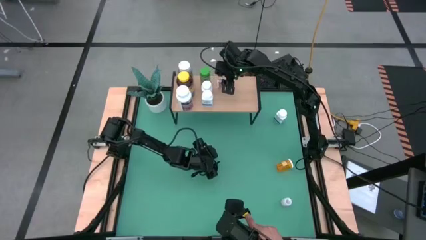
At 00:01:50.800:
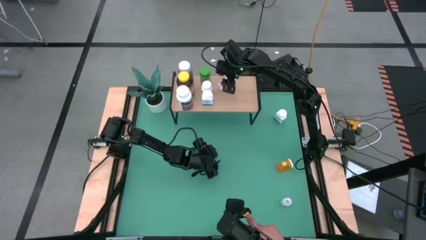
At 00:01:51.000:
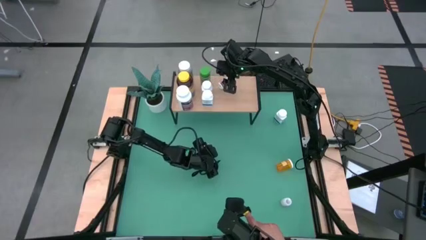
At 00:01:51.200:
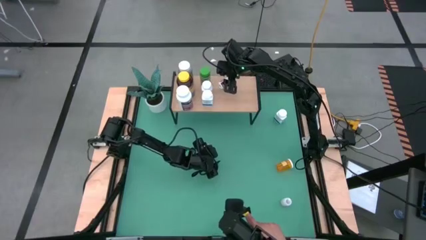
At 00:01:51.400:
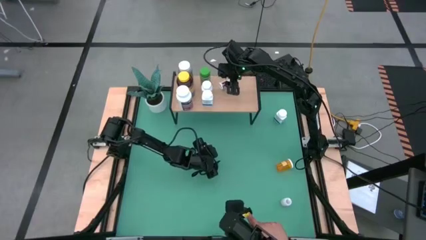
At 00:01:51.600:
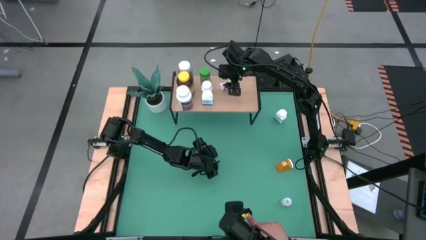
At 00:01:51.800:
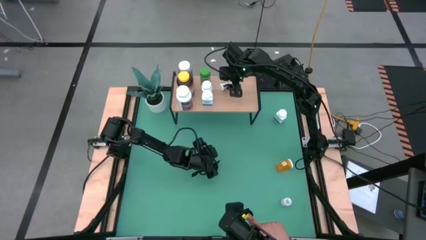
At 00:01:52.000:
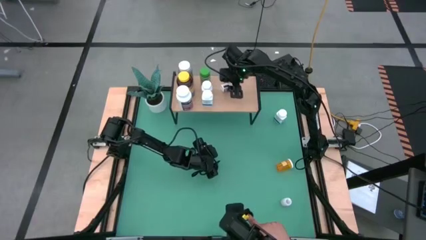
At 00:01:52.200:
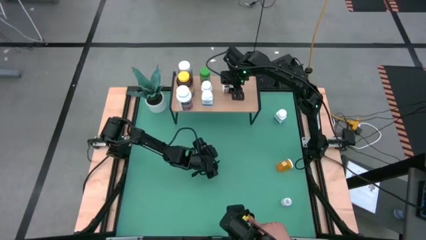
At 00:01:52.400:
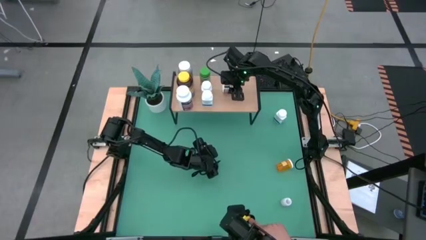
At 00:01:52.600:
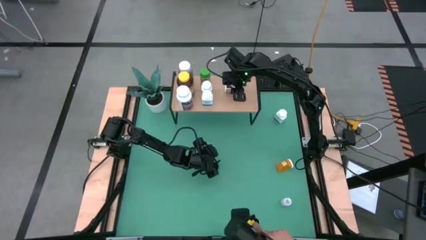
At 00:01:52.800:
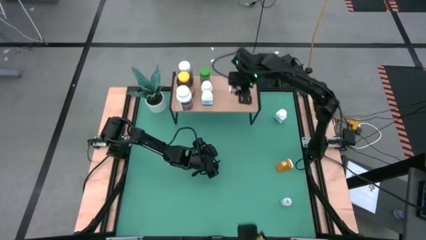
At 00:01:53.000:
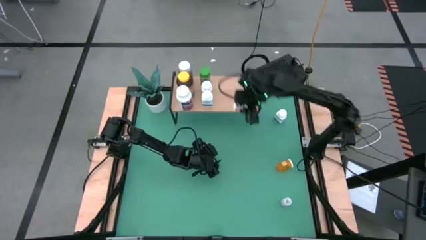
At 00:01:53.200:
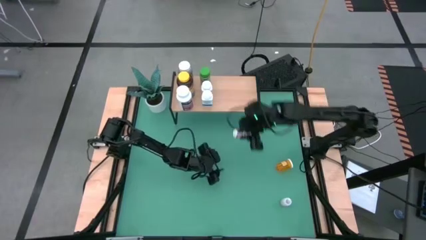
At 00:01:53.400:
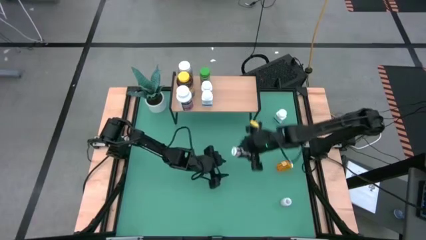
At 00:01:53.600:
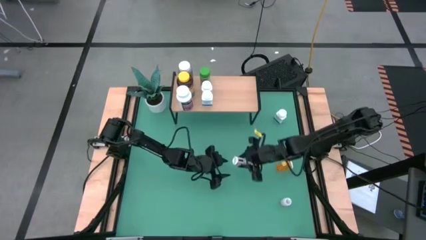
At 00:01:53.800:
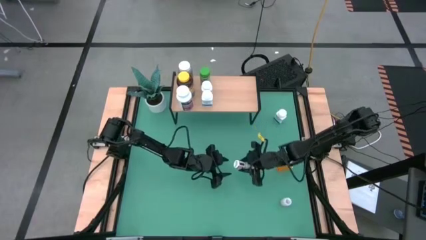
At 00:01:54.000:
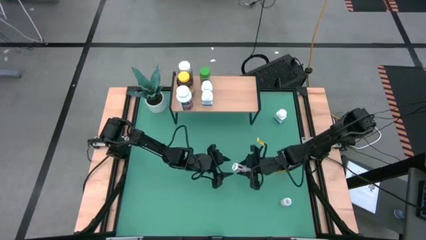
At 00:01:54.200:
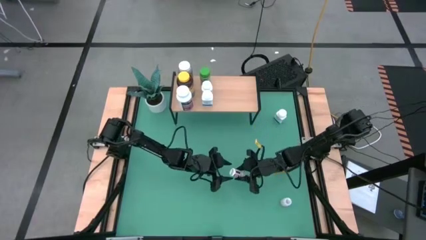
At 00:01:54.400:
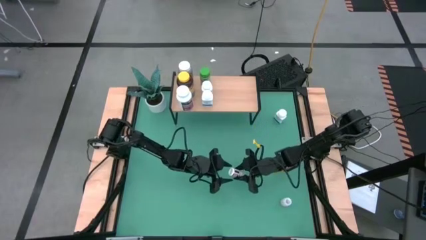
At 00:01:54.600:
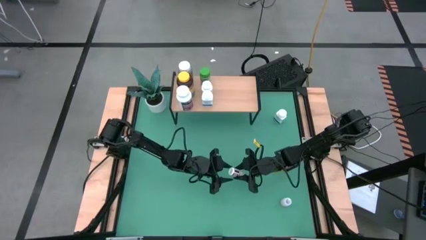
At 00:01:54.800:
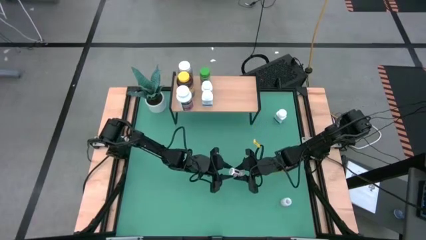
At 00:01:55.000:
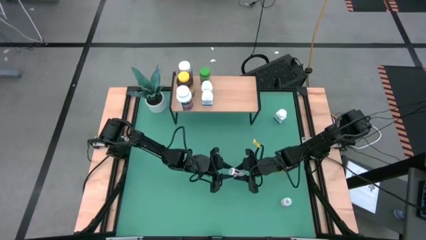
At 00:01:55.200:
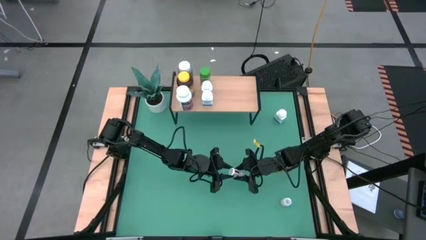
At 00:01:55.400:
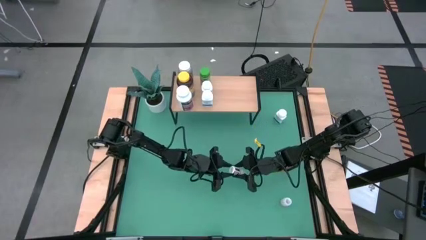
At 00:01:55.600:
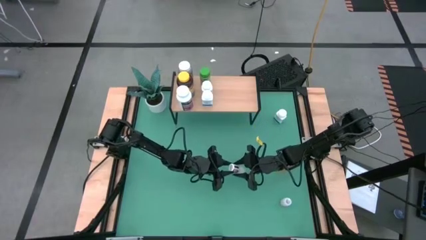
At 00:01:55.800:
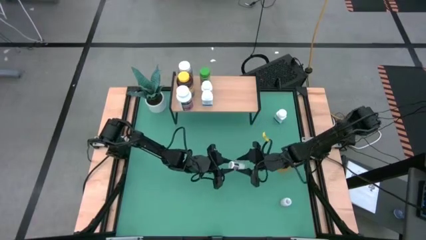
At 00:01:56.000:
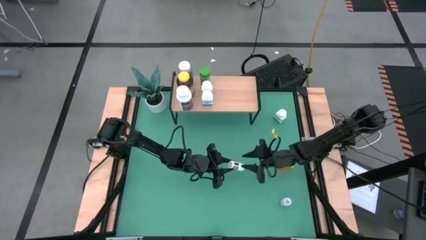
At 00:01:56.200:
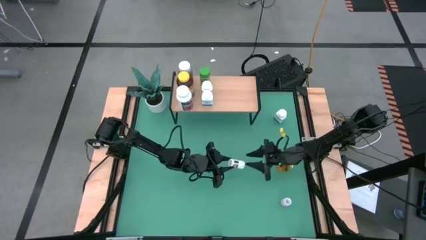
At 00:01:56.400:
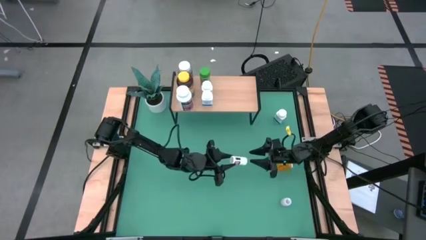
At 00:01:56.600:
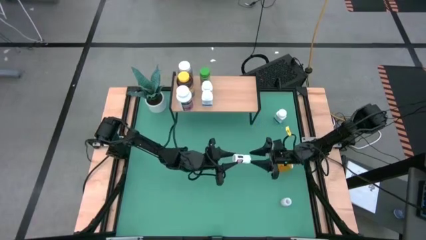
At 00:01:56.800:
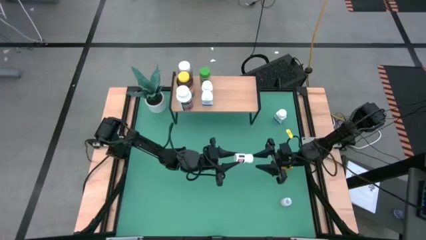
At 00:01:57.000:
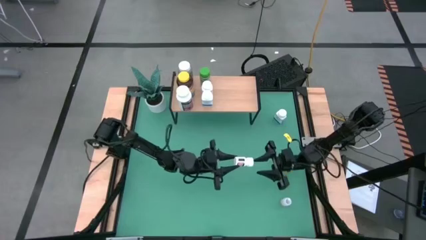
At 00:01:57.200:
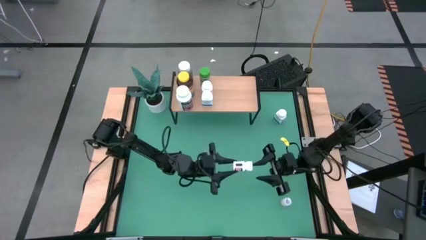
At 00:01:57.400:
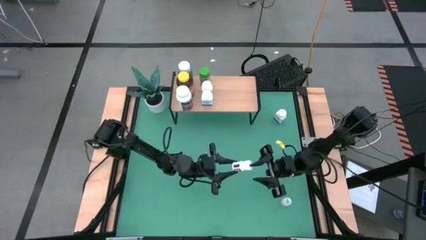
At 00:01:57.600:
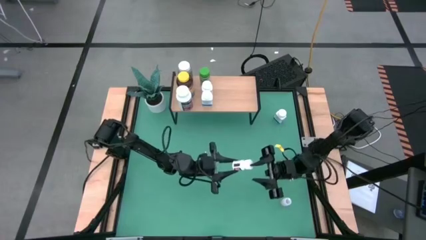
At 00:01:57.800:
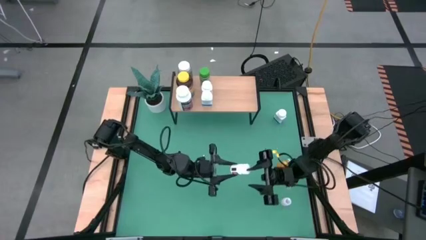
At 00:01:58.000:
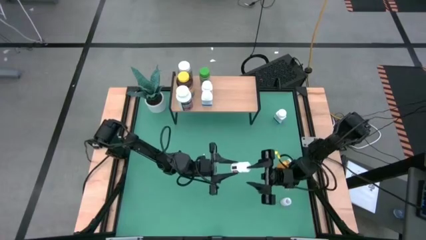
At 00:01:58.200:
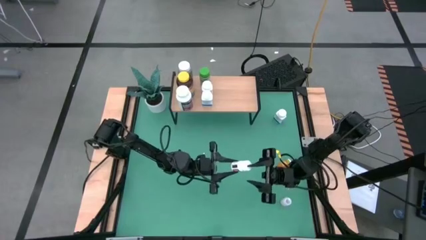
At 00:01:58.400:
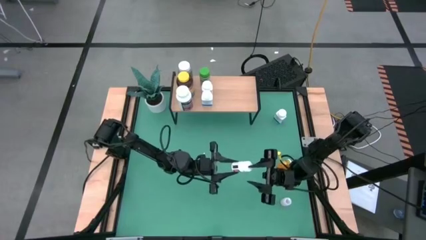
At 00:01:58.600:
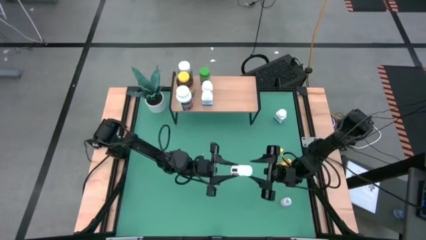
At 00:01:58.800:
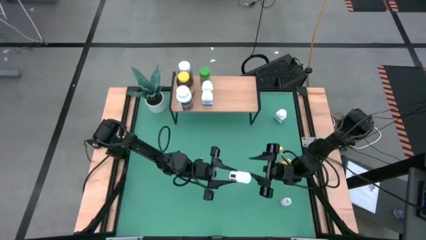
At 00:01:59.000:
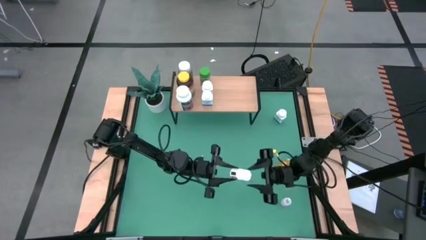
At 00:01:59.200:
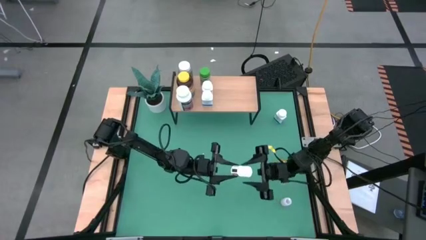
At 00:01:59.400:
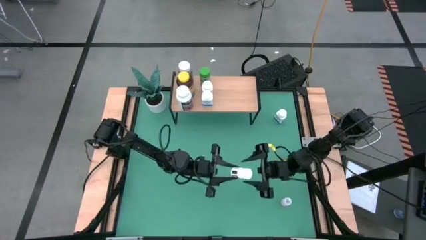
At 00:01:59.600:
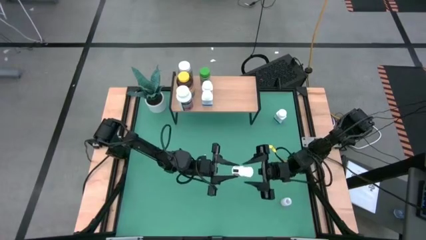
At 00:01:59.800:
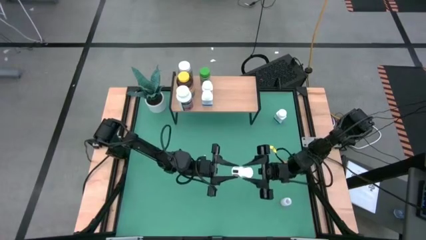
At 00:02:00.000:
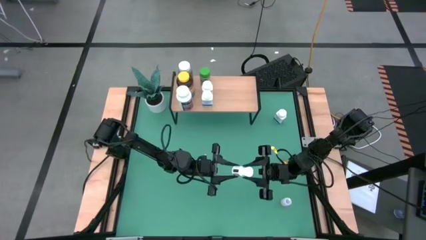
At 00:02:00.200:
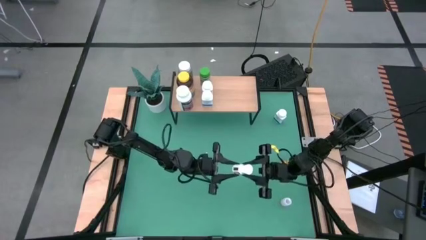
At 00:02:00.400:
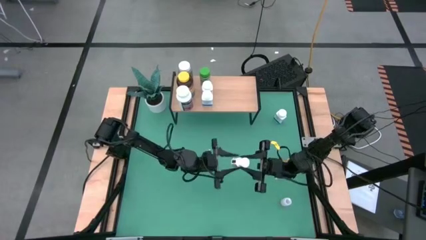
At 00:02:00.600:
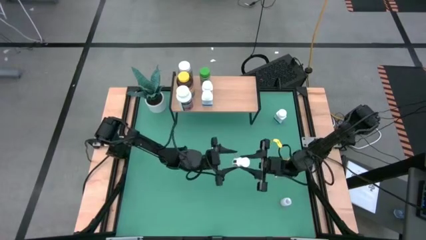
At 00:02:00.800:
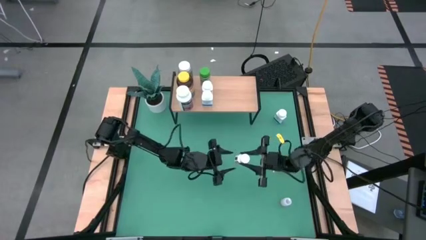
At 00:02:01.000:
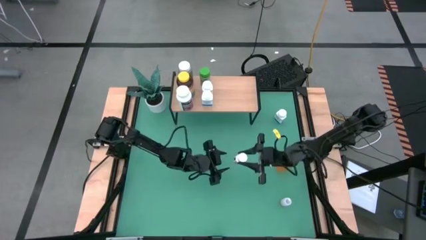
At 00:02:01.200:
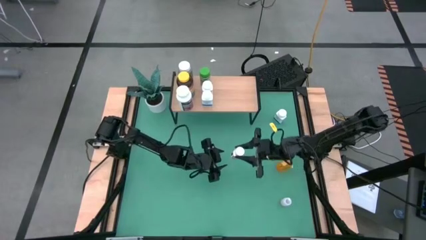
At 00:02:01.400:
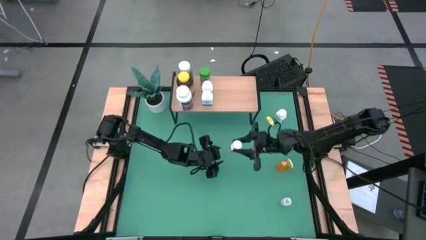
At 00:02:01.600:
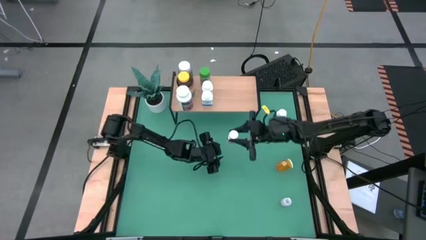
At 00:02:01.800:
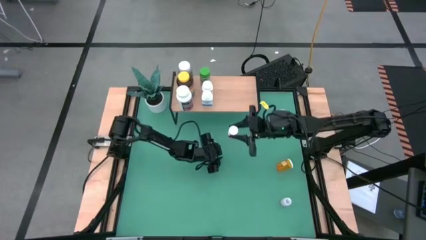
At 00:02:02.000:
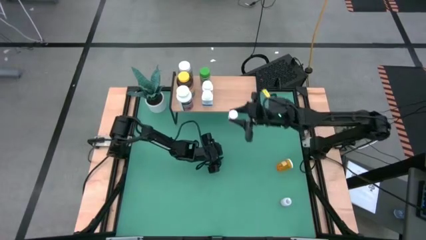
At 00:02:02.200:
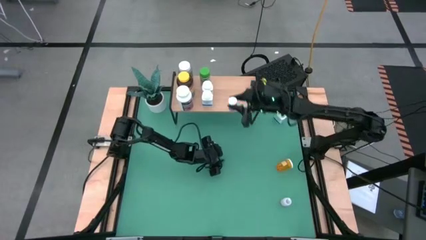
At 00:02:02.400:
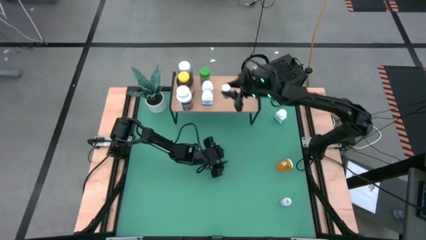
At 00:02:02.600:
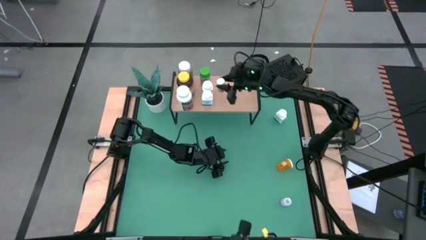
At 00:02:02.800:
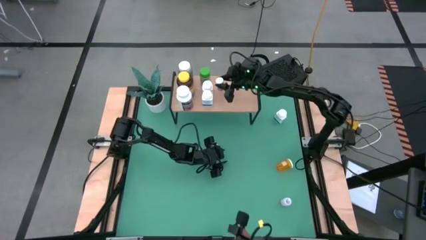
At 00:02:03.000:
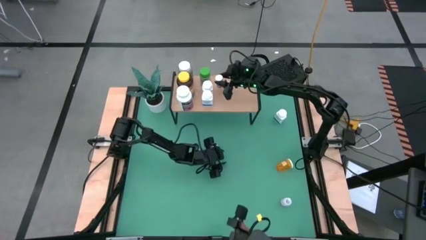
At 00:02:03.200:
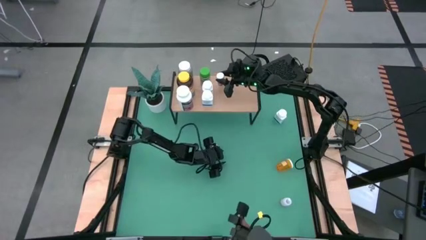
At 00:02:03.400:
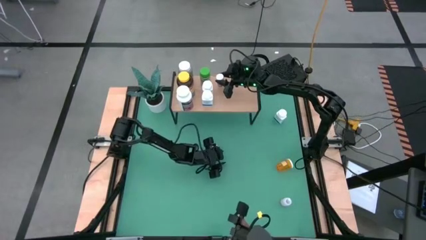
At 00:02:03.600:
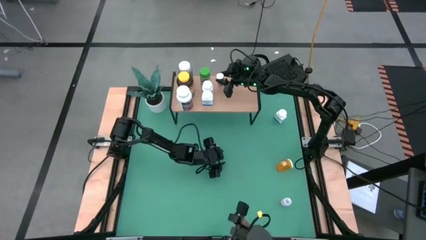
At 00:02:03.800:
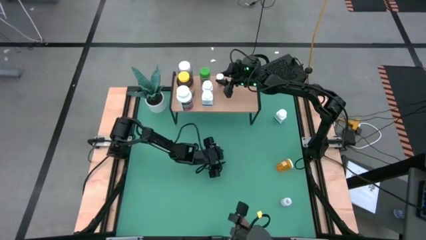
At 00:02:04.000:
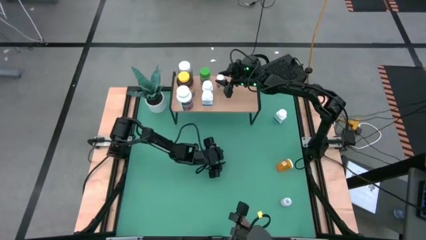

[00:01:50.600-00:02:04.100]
Task: Pick and place medicine bottles onto shelf by color
Put the black white pill bottle on the shelf
